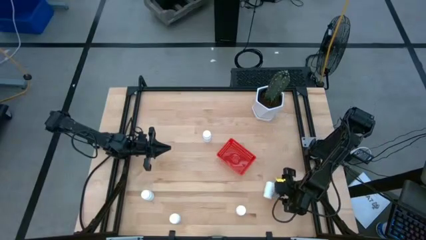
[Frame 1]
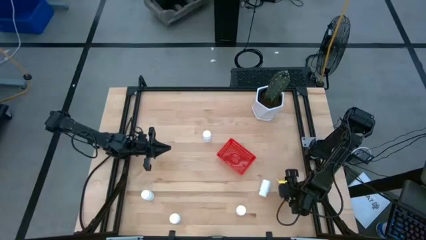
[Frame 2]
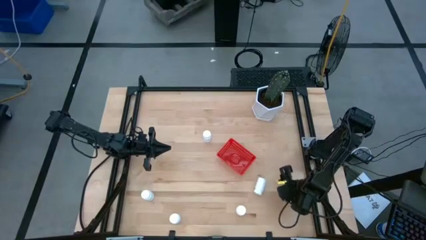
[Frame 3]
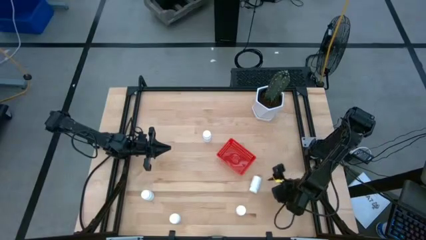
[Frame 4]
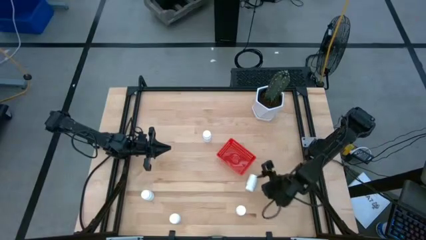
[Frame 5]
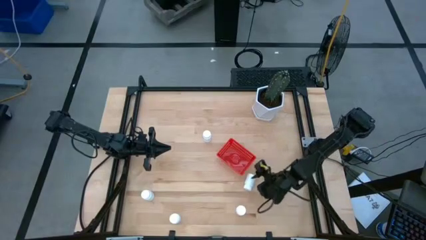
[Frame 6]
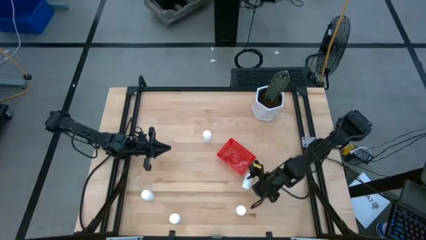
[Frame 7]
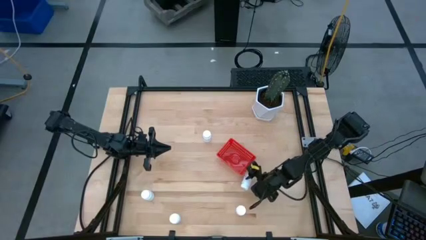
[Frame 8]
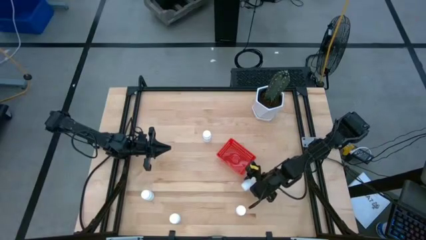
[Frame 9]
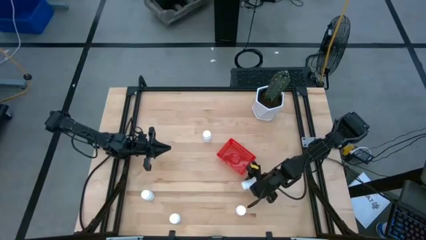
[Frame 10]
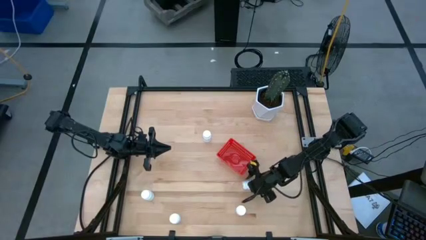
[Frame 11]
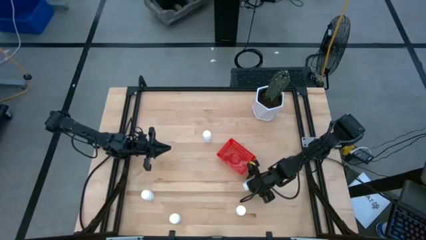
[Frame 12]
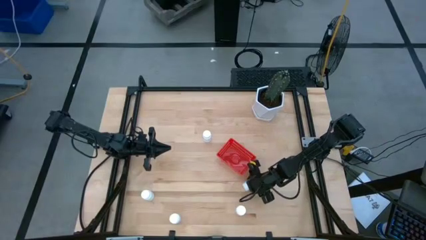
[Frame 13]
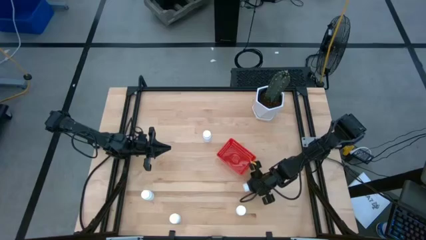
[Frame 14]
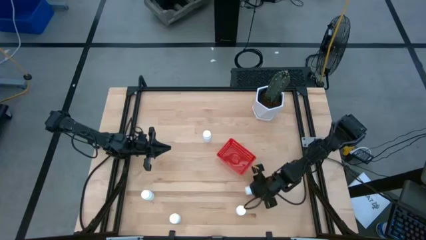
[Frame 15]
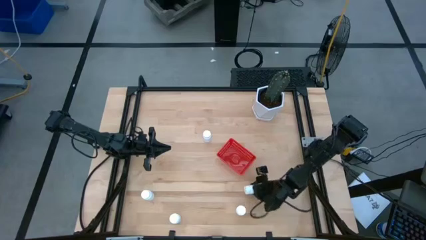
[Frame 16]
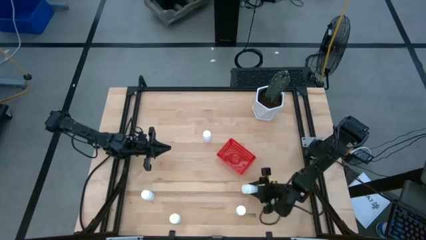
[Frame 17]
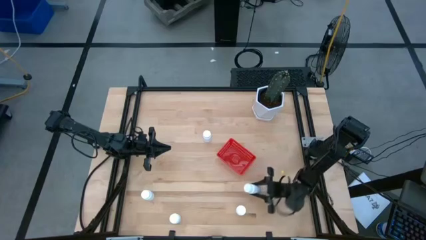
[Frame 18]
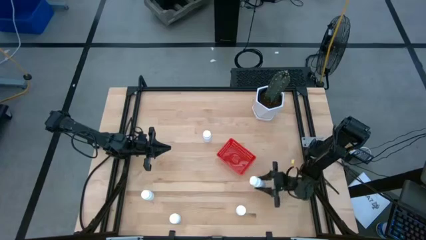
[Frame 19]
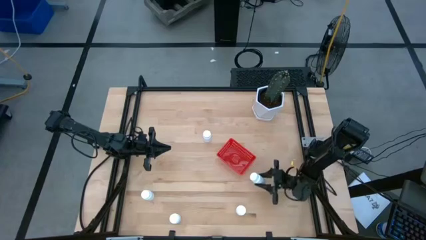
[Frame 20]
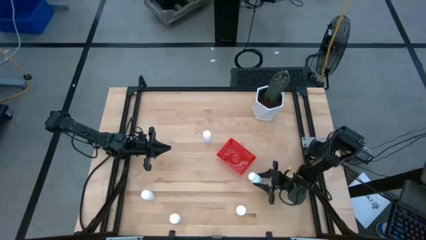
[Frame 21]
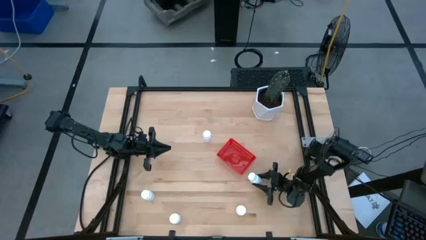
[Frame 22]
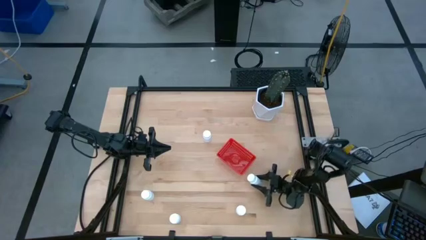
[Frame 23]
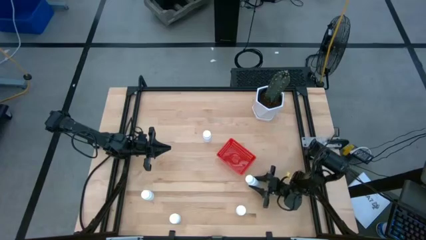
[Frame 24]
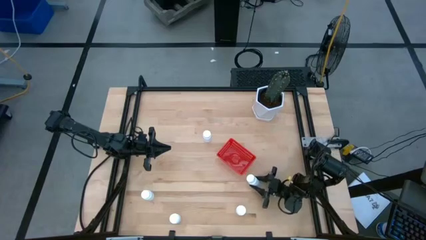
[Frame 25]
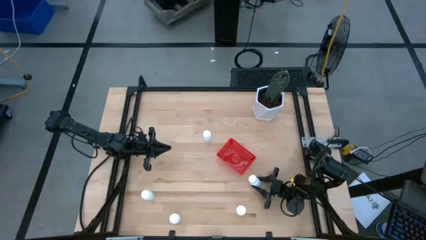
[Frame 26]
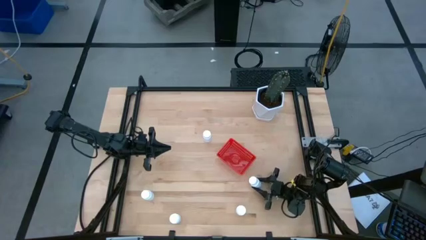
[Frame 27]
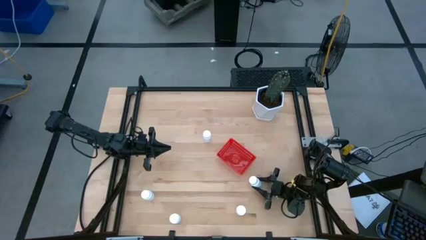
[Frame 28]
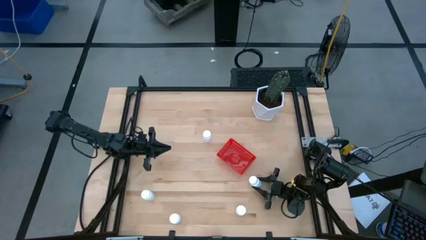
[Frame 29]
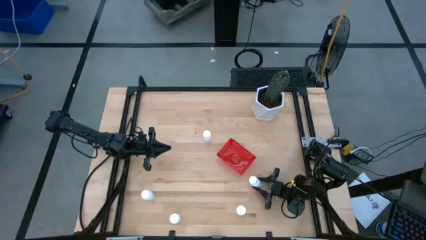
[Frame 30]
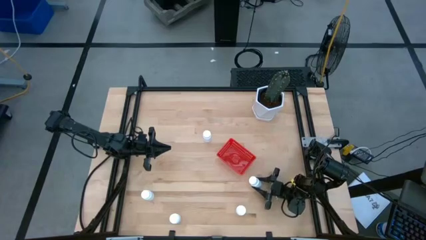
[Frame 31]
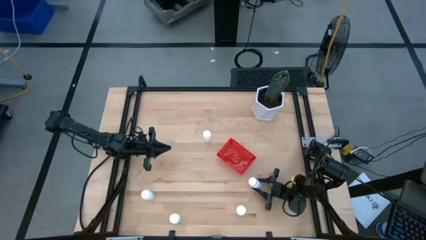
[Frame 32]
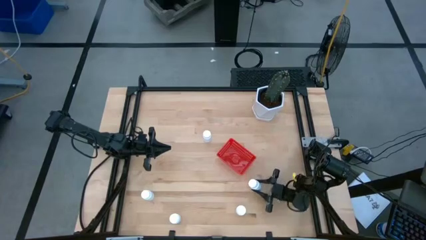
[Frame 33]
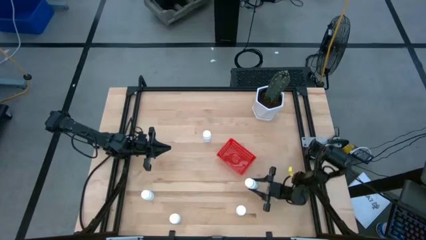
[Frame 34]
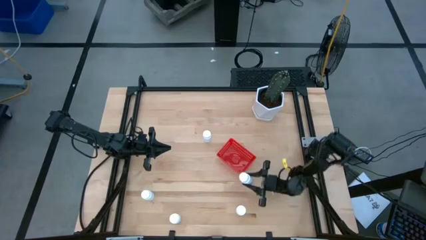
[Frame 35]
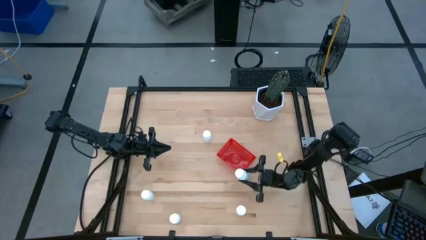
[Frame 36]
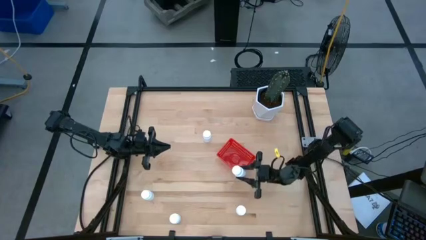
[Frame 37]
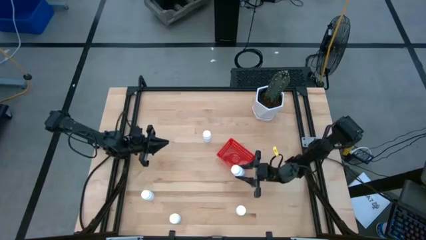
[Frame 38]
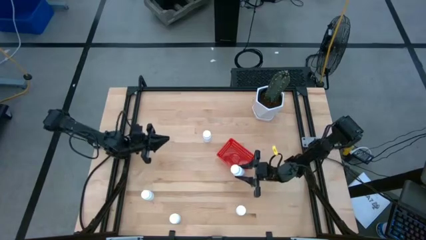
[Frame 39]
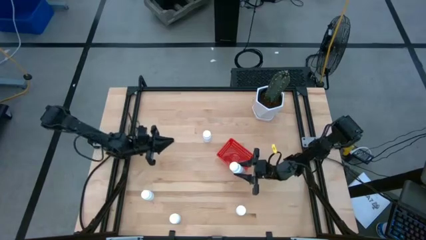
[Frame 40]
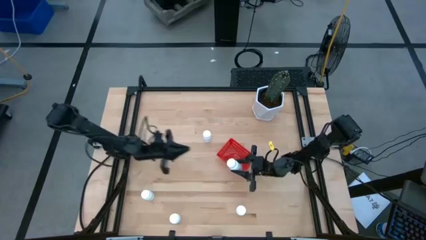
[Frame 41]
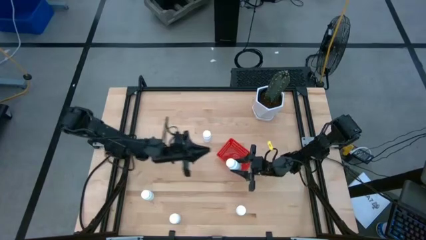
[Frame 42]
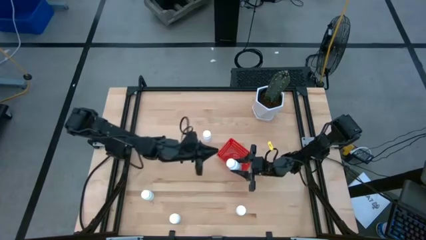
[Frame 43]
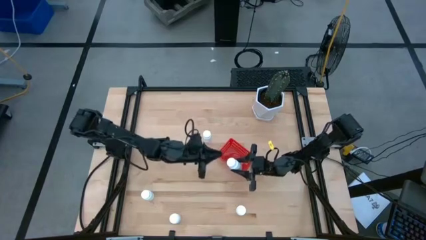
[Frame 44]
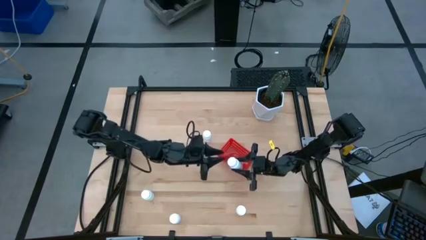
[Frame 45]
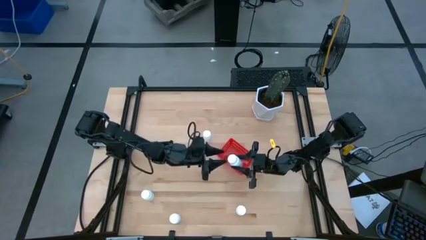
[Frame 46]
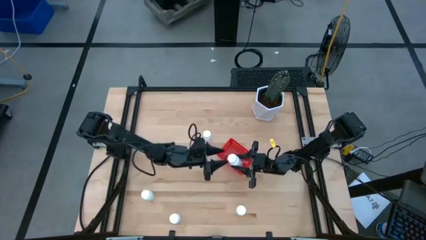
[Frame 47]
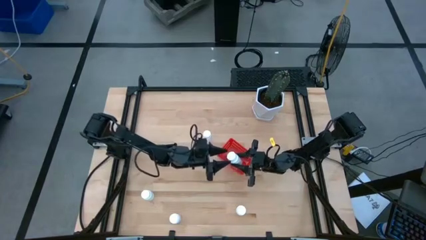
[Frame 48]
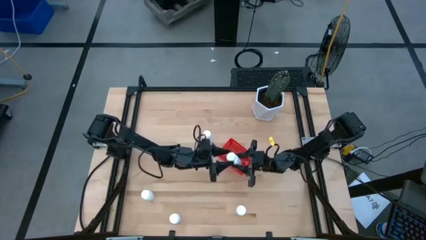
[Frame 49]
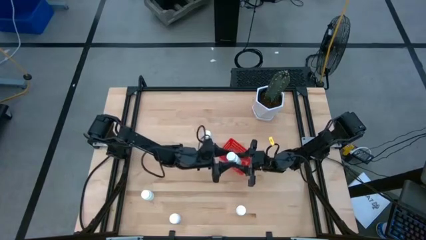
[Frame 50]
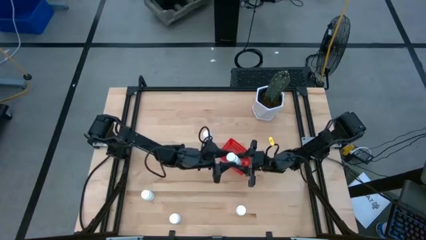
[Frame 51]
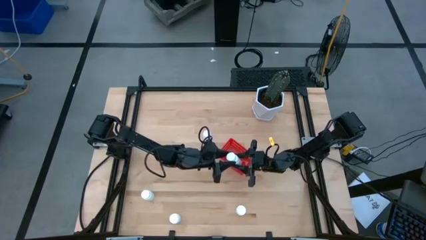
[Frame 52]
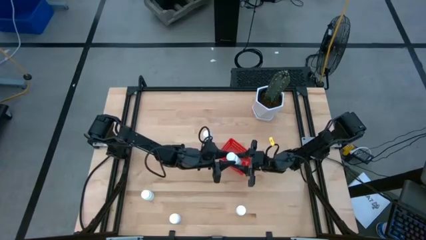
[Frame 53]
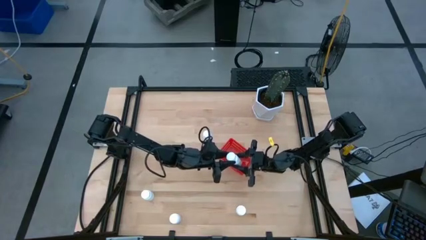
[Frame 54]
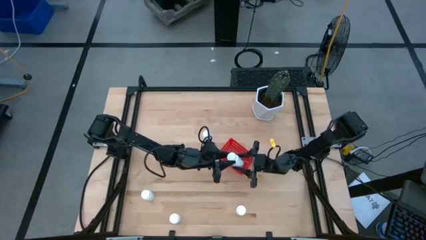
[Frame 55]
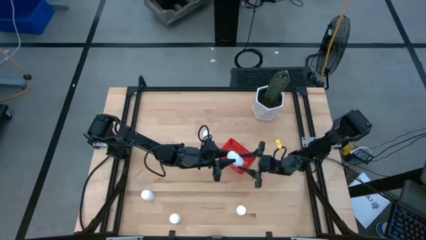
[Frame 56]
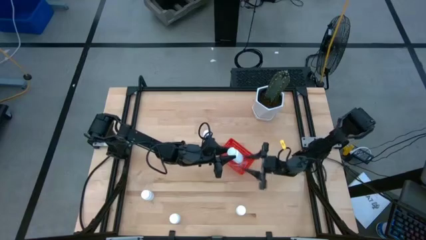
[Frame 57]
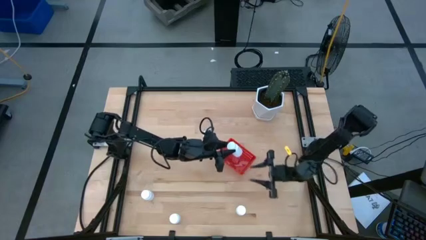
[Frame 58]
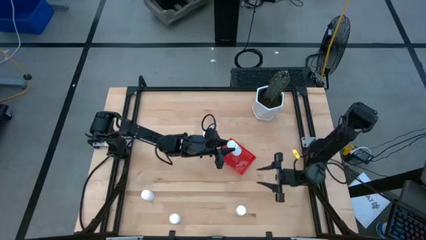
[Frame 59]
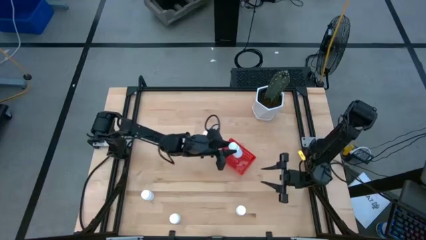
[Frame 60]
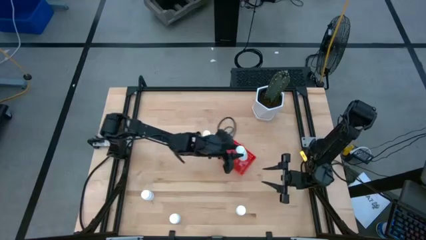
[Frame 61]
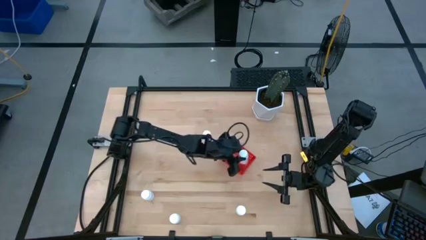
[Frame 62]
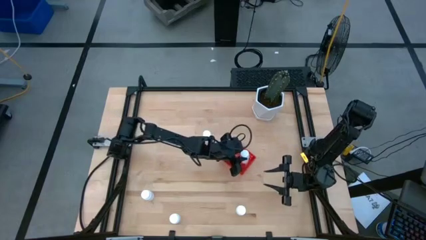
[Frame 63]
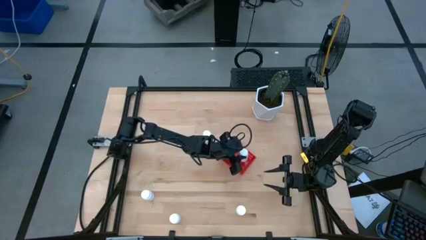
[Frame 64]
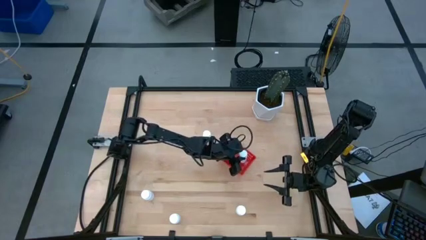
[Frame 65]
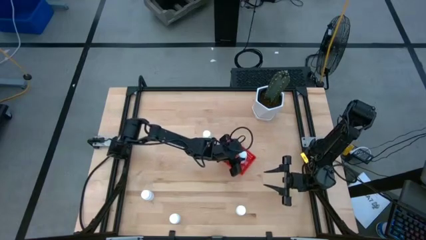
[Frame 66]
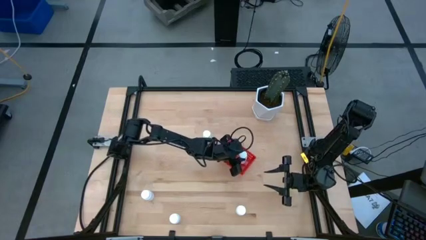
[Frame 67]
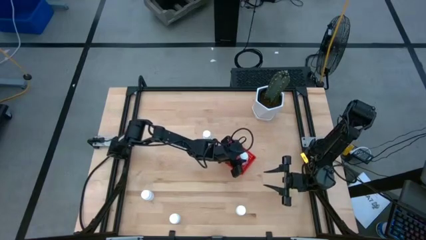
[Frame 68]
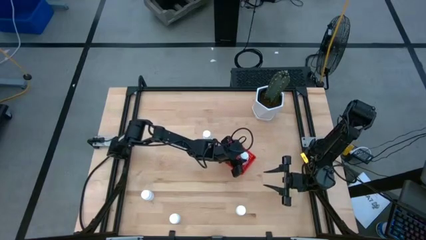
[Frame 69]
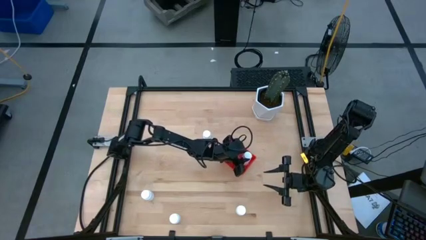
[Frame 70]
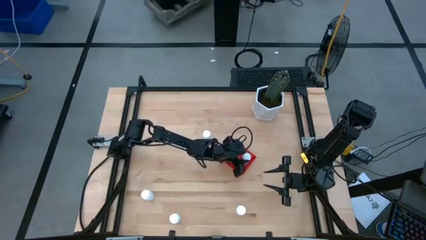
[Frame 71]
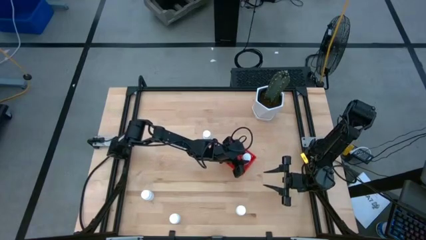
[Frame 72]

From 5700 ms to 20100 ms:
Task: Pick and place pill bottles into a basket
Put the white pill bottle into the red bin
